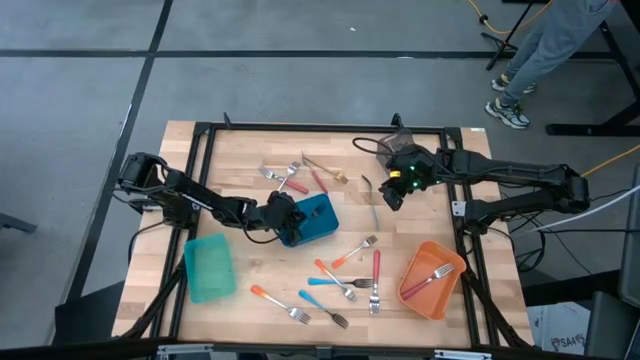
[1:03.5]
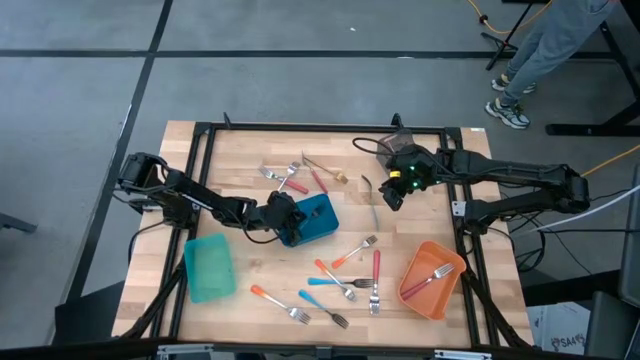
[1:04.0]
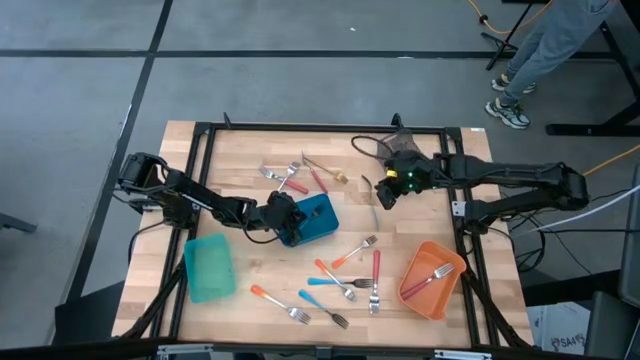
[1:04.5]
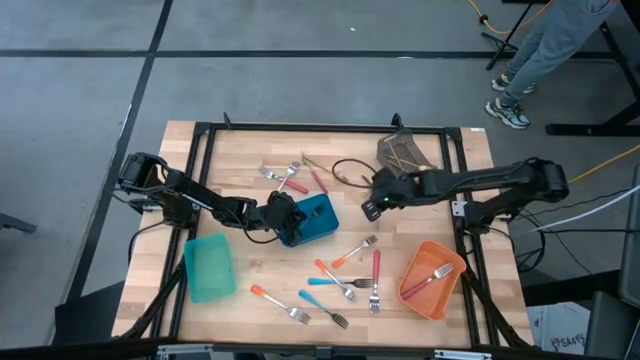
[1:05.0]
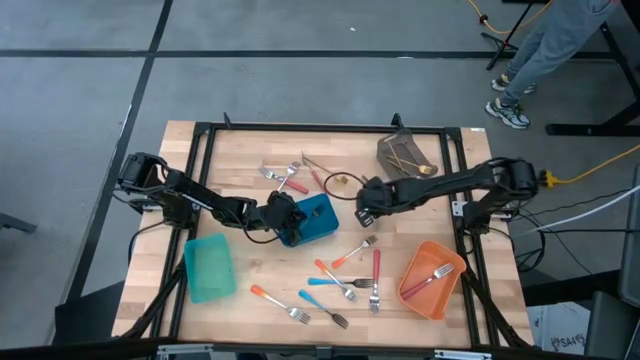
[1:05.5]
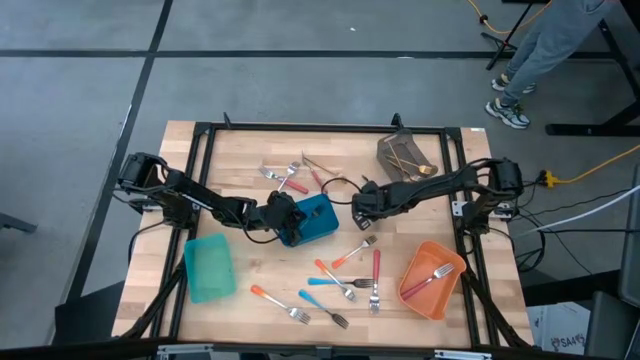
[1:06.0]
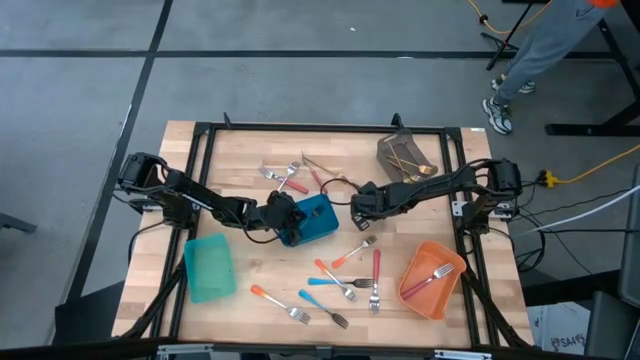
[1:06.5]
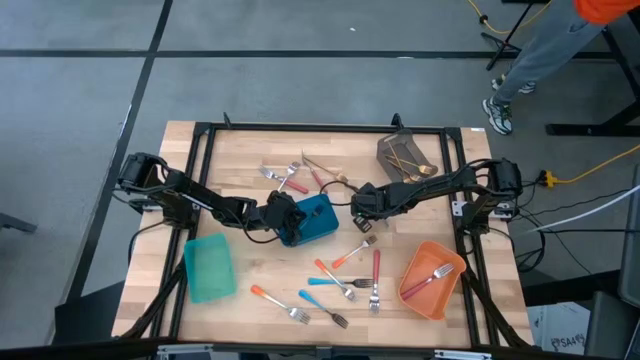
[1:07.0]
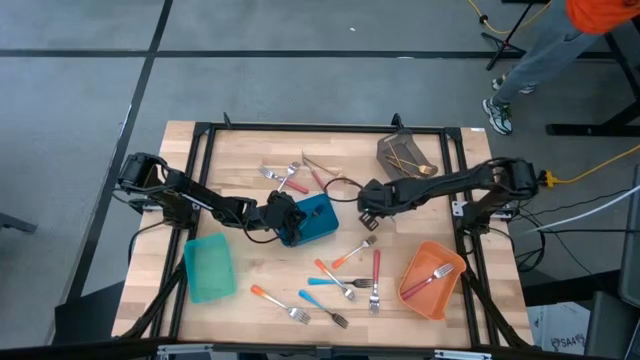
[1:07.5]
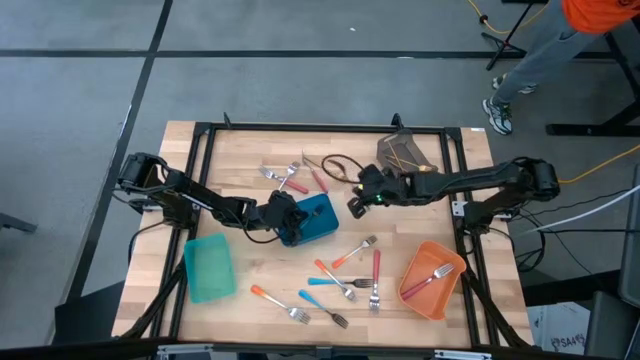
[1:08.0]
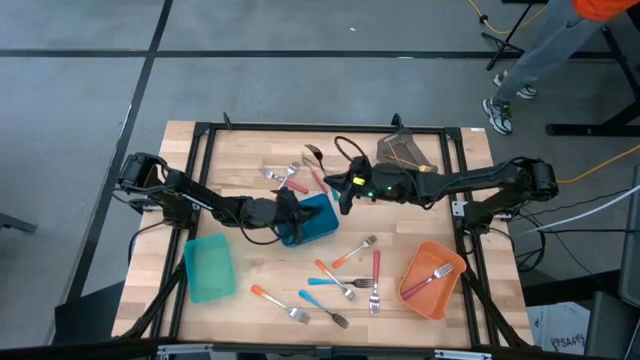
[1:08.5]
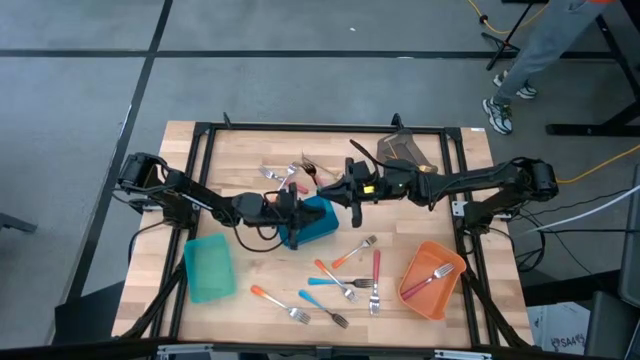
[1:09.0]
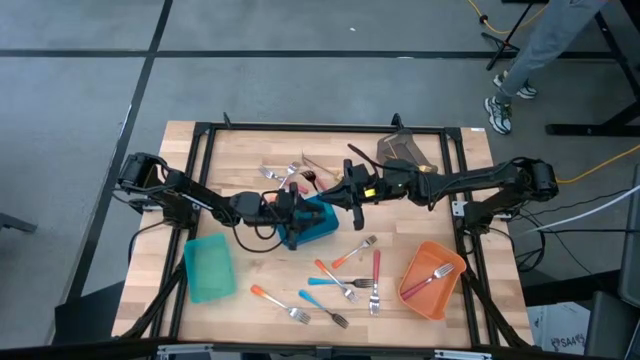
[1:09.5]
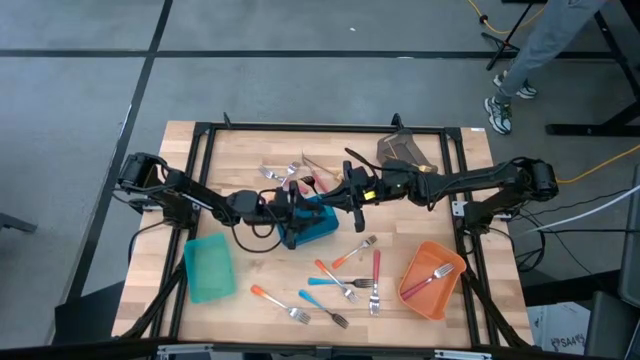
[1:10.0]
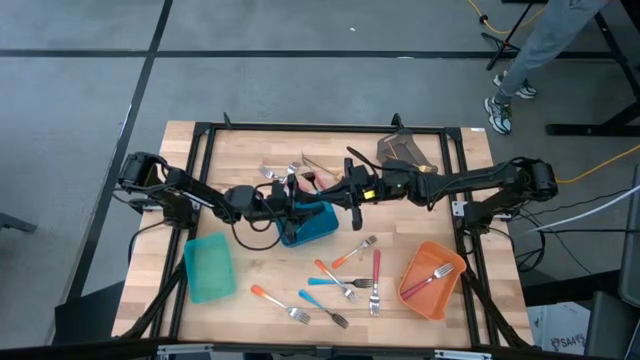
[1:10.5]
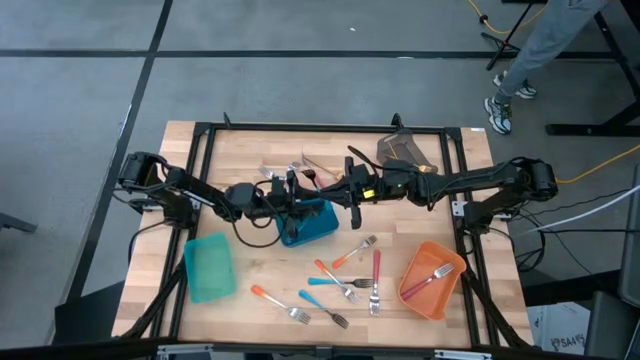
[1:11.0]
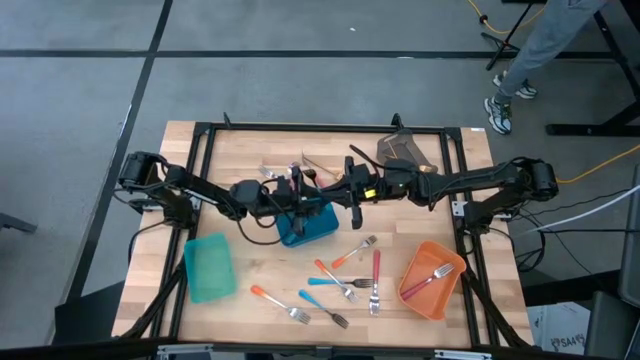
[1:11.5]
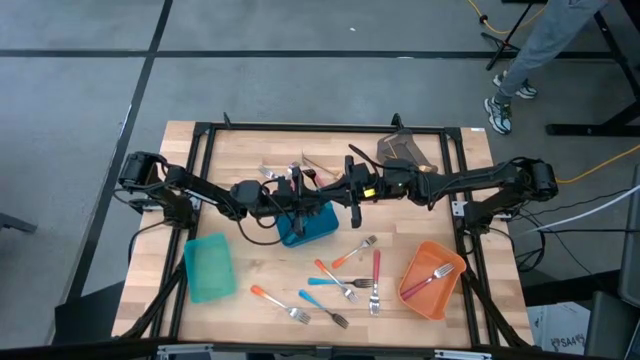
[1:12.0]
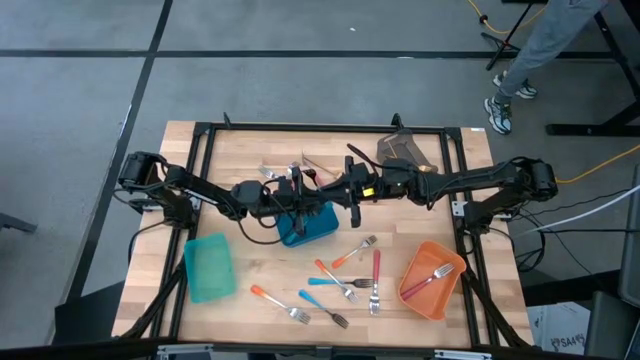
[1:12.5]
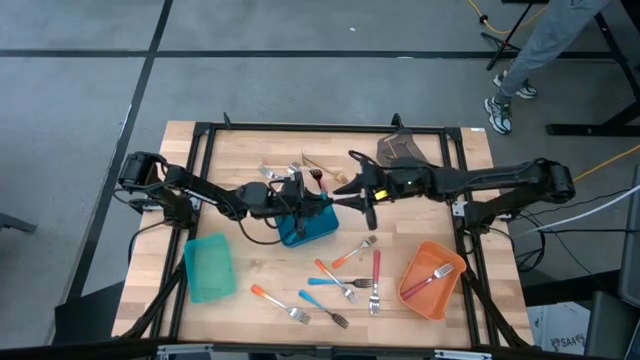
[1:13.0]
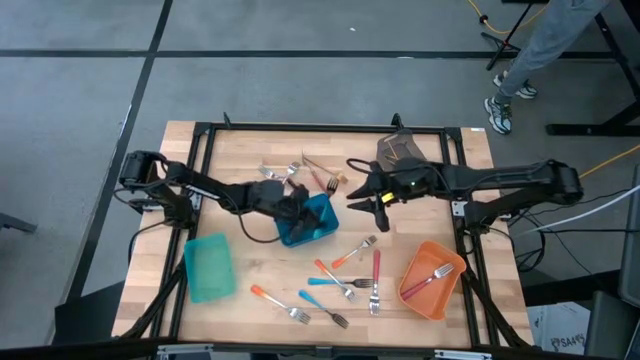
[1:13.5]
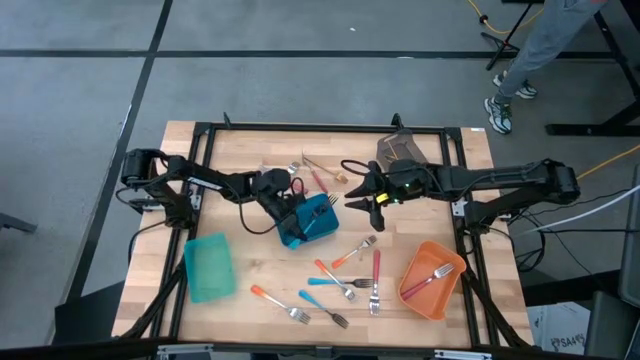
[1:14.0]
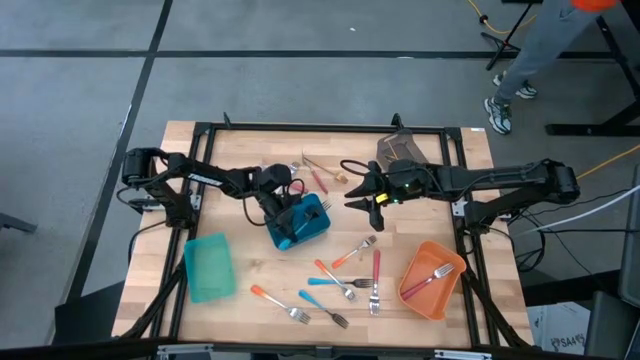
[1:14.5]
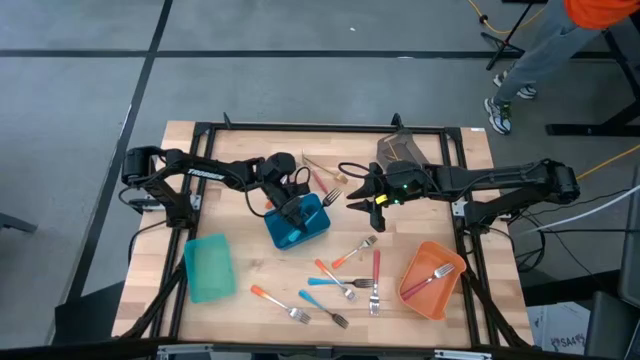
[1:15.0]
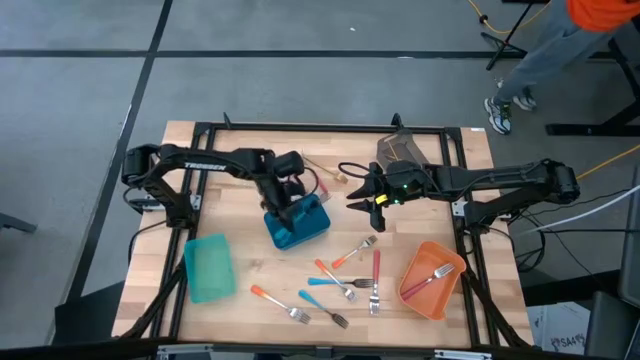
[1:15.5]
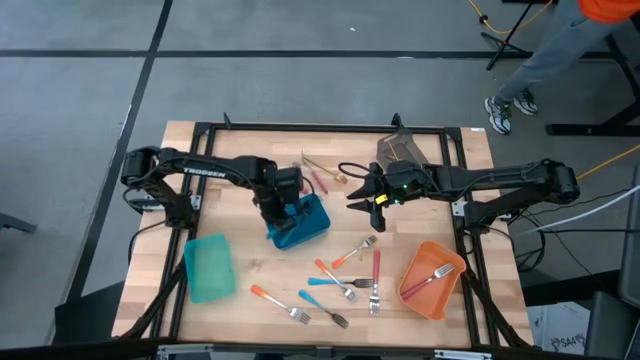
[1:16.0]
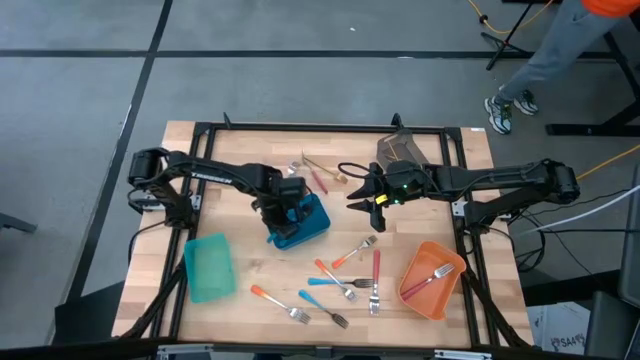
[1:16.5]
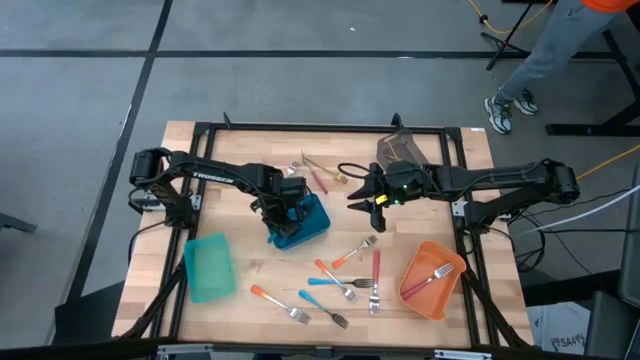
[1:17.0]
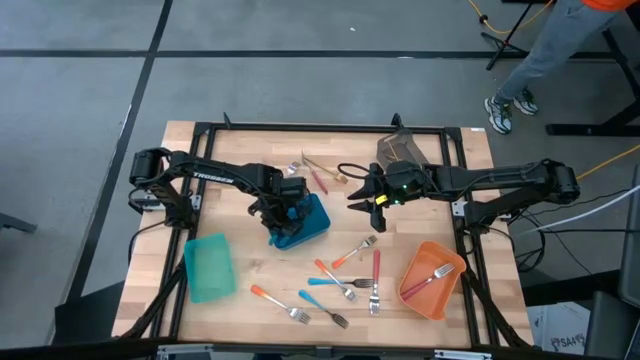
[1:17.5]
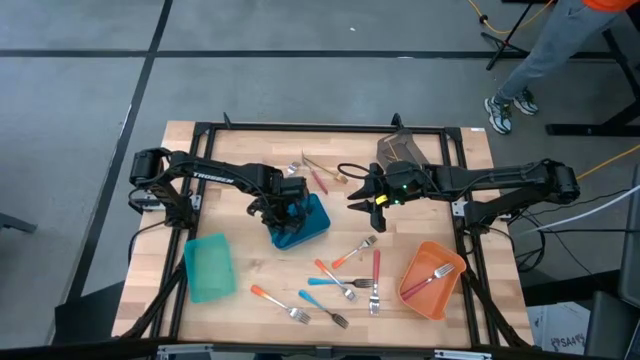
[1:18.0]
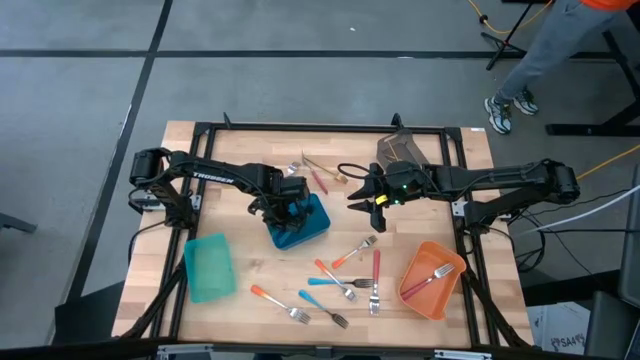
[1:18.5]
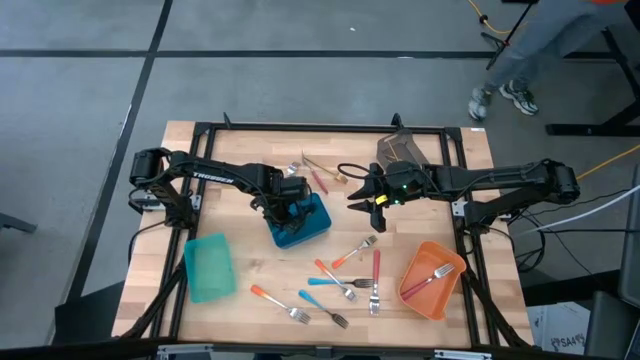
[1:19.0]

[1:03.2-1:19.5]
Task: Sort silverware by color (type)
Put the top right blue fork into the dark blue bin
